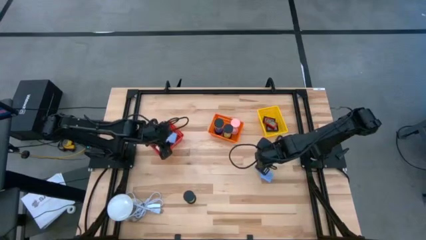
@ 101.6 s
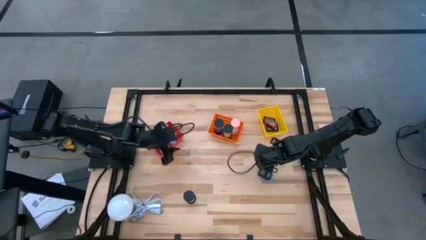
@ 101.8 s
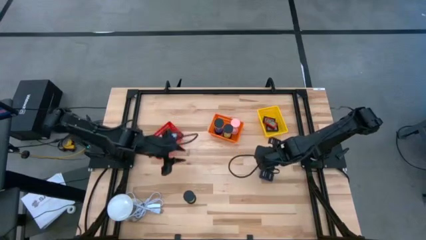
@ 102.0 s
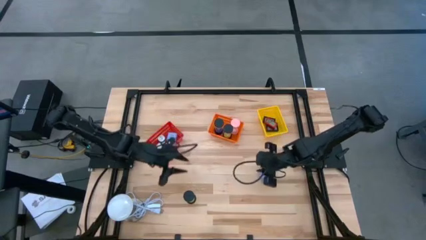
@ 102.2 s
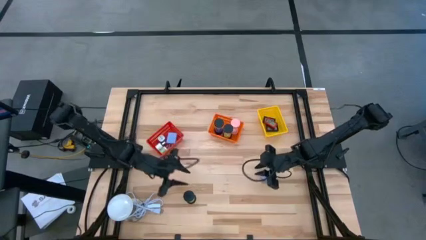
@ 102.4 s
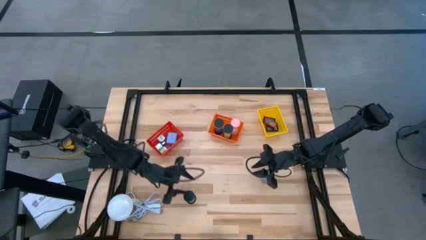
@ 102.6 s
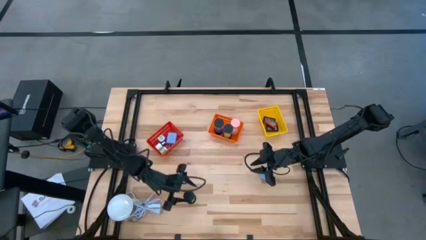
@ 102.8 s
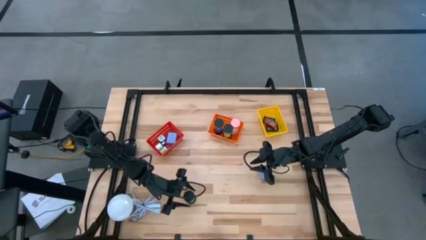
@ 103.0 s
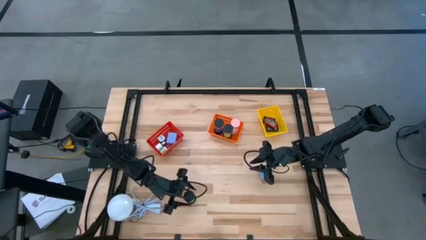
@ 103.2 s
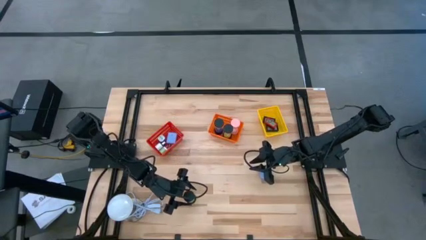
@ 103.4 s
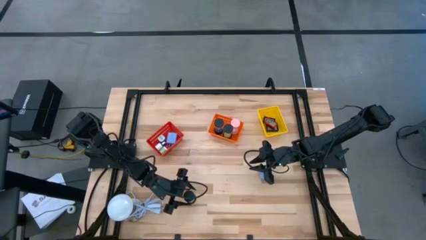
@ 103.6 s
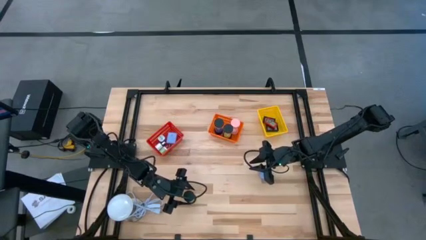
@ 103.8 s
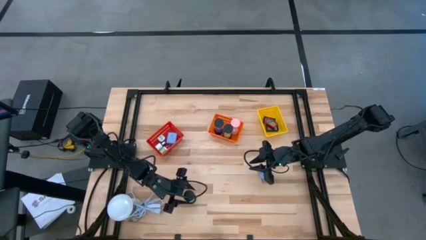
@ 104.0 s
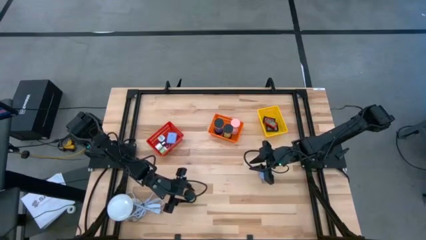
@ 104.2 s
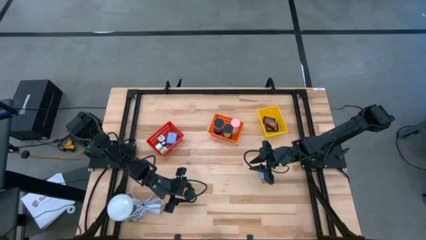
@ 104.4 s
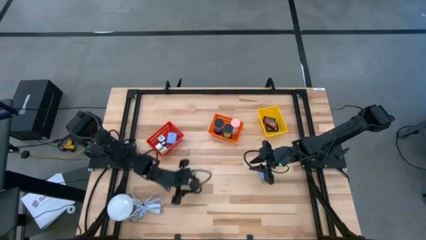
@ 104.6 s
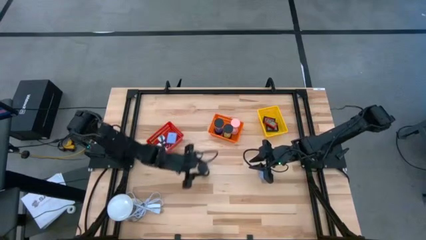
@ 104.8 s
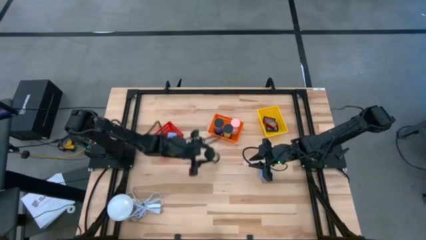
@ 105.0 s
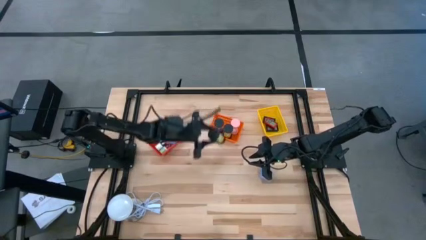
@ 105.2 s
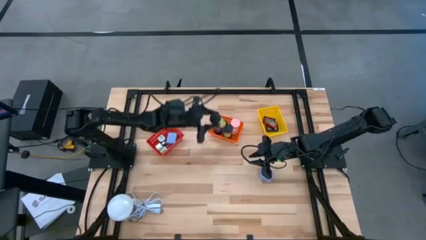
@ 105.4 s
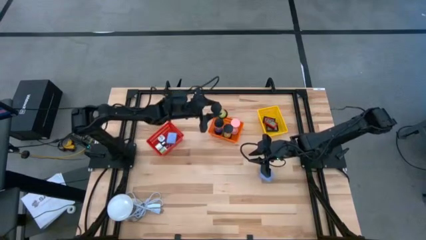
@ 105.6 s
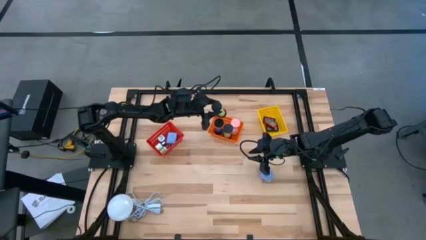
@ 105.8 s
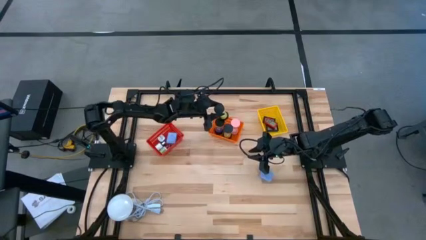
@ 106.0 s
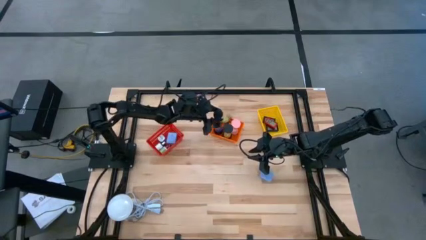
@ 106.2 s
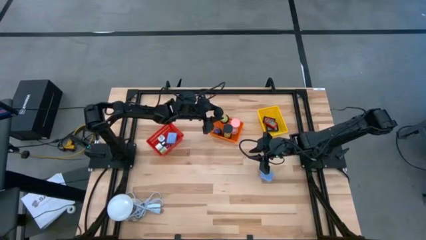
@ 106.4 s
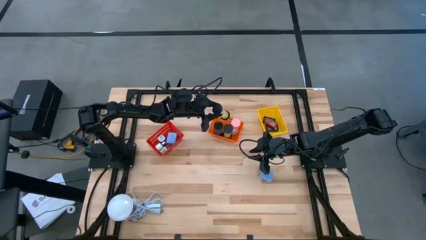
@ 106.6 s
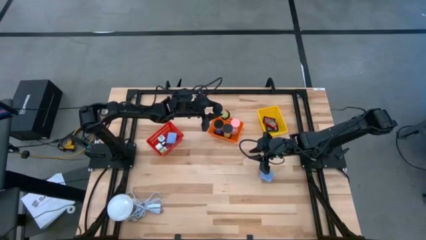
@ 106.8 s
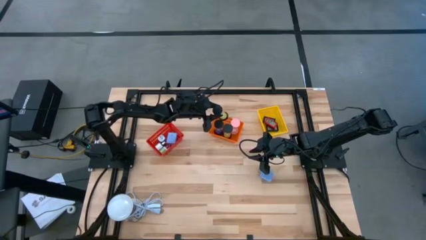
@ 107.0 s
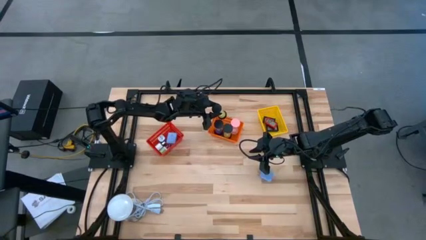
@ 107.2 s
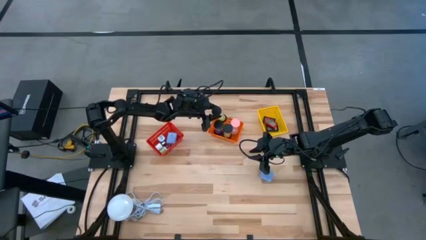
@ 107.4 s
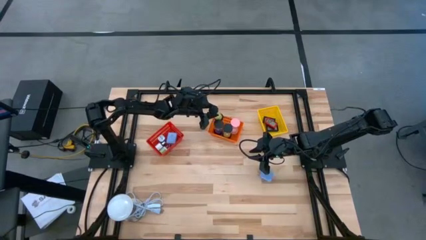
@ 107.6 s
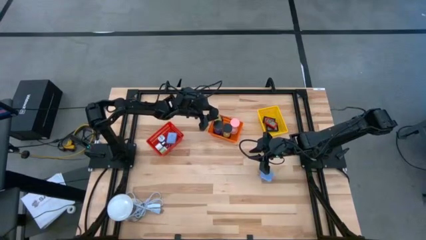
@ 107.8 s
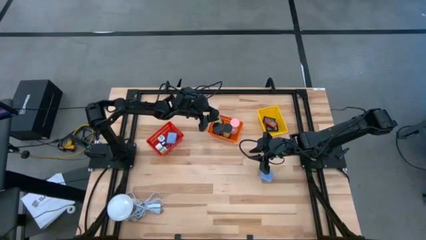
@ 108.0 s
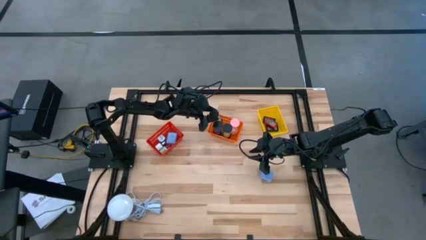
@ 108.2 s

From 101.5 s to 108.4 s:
Task: Pick & Place Office items
Put the black hourglass into the yellow basket

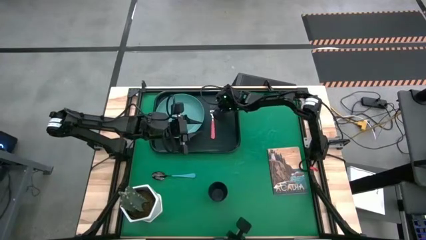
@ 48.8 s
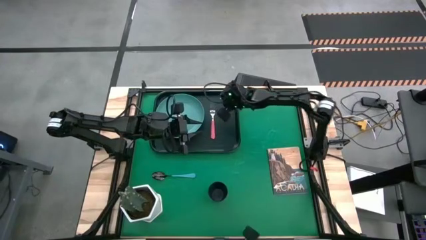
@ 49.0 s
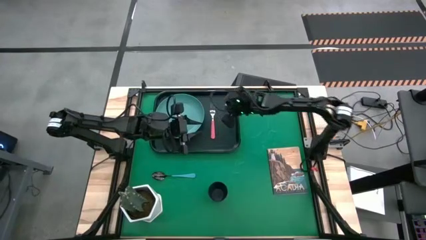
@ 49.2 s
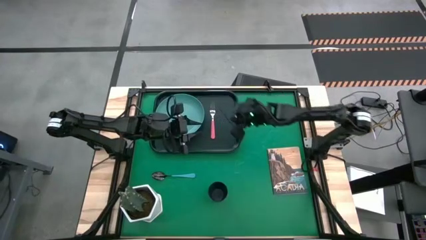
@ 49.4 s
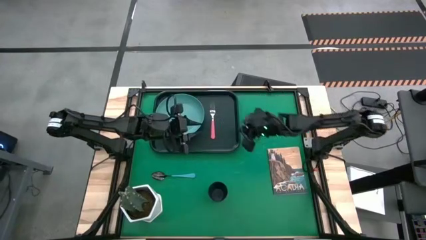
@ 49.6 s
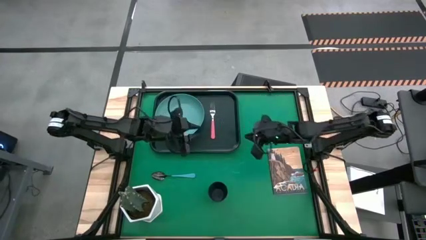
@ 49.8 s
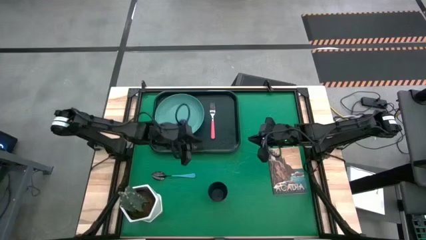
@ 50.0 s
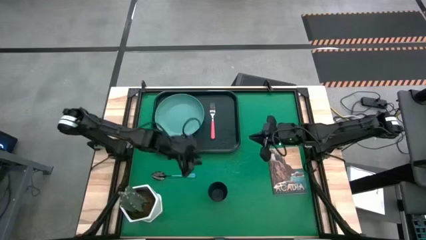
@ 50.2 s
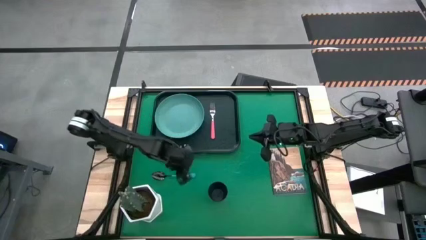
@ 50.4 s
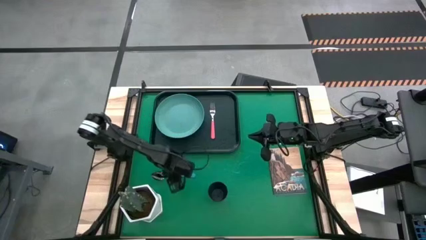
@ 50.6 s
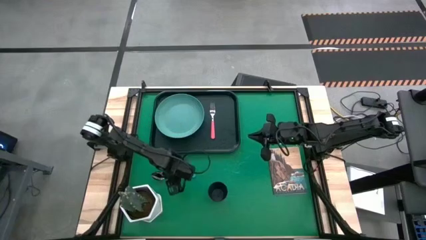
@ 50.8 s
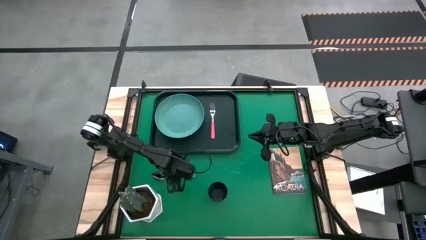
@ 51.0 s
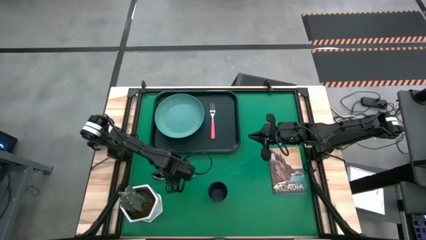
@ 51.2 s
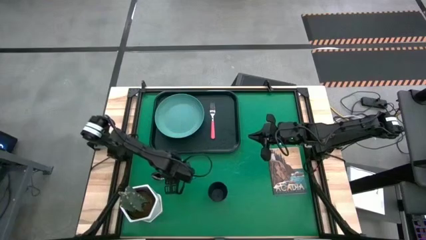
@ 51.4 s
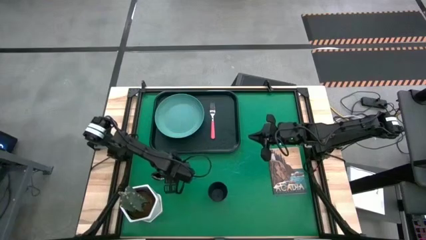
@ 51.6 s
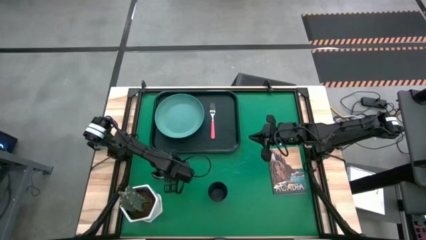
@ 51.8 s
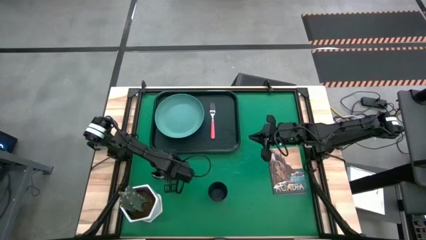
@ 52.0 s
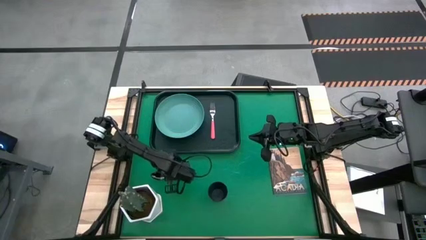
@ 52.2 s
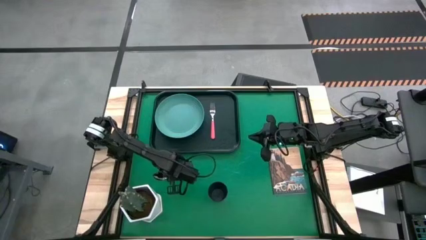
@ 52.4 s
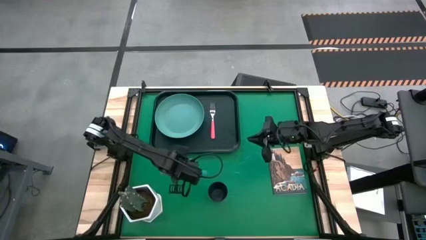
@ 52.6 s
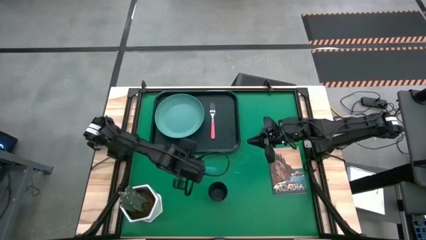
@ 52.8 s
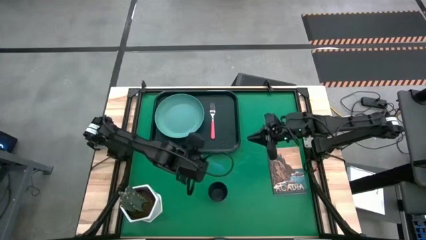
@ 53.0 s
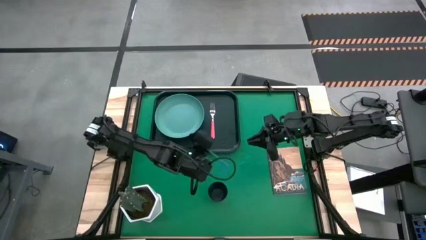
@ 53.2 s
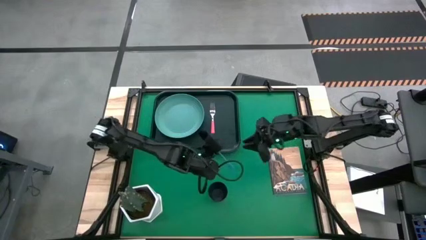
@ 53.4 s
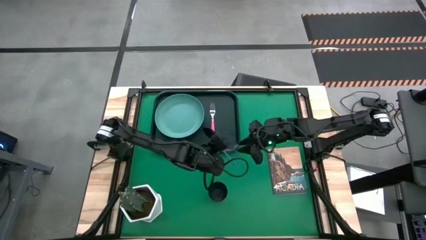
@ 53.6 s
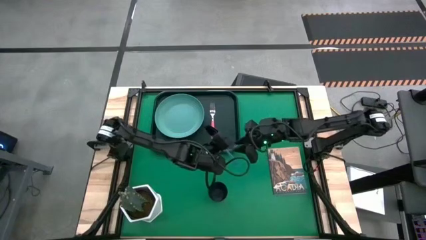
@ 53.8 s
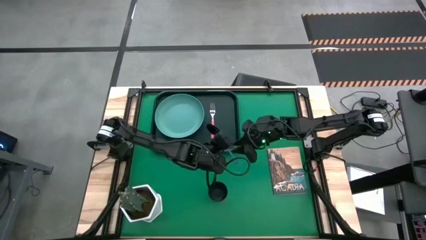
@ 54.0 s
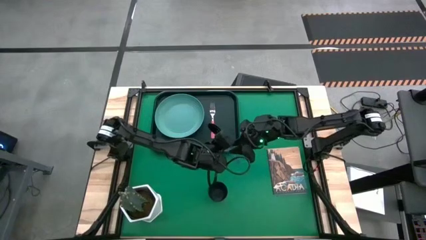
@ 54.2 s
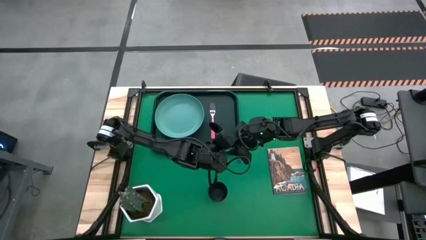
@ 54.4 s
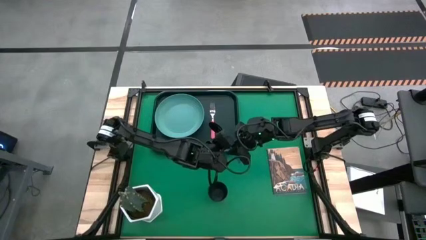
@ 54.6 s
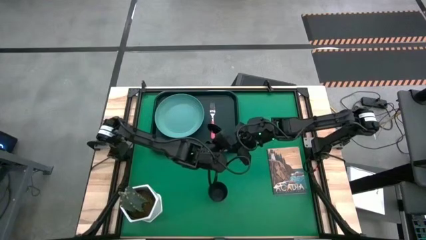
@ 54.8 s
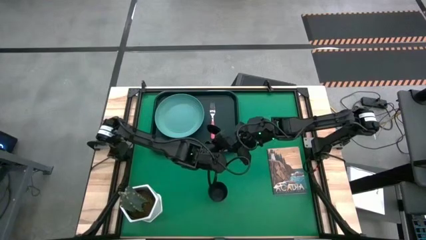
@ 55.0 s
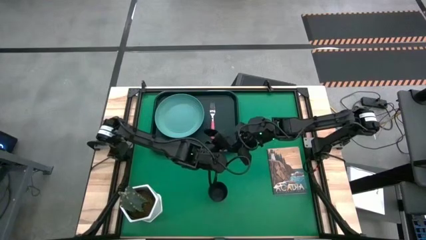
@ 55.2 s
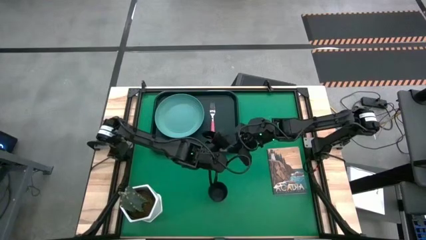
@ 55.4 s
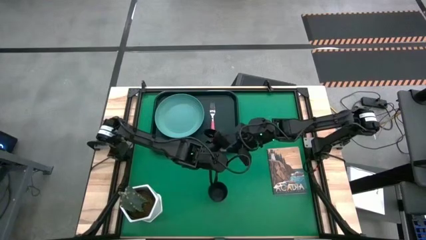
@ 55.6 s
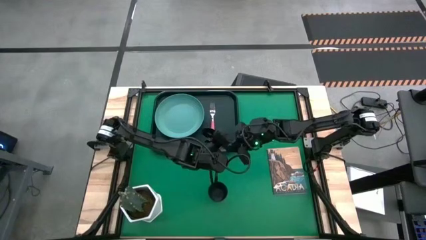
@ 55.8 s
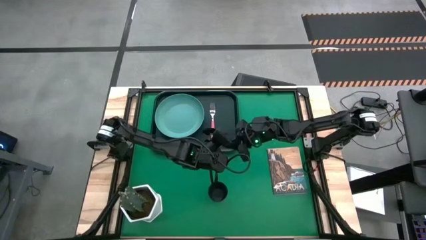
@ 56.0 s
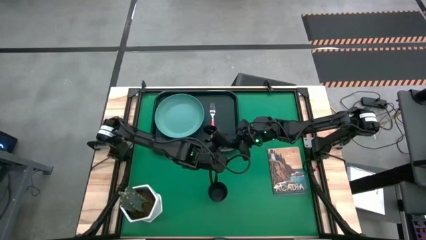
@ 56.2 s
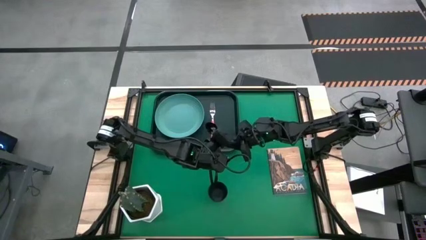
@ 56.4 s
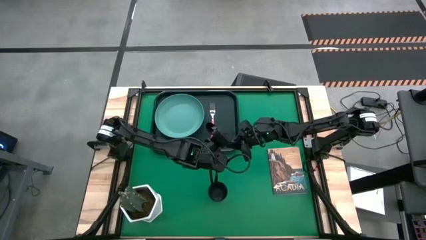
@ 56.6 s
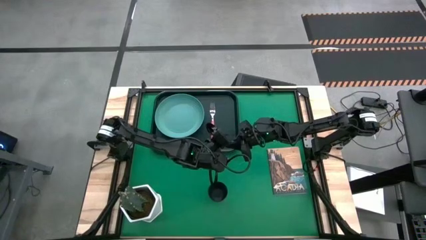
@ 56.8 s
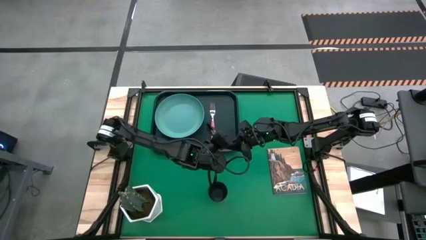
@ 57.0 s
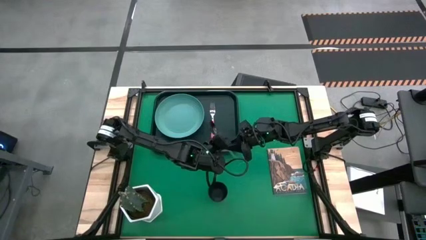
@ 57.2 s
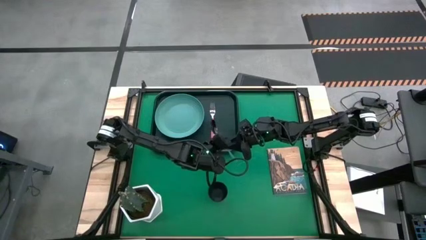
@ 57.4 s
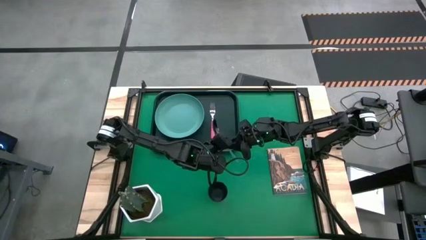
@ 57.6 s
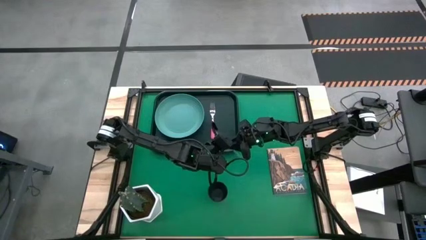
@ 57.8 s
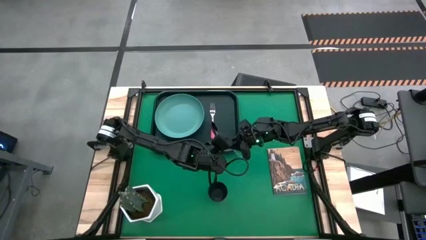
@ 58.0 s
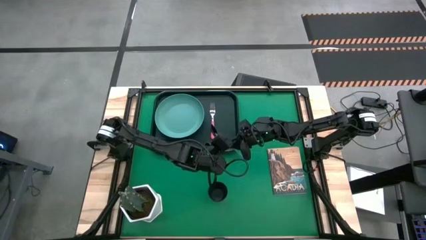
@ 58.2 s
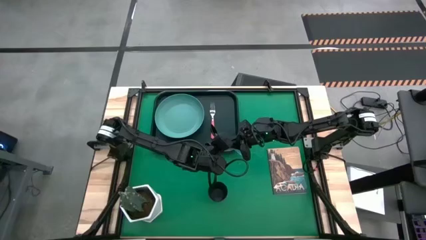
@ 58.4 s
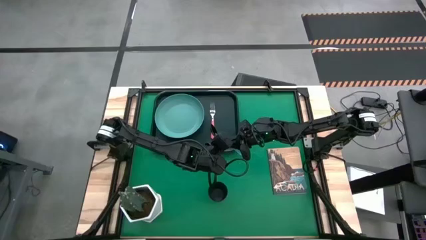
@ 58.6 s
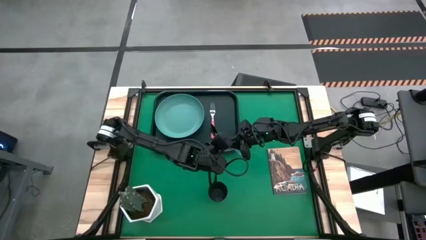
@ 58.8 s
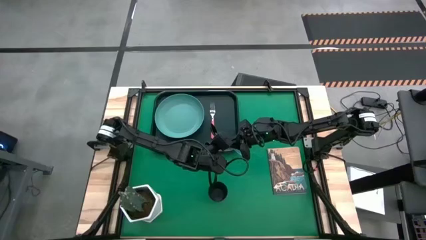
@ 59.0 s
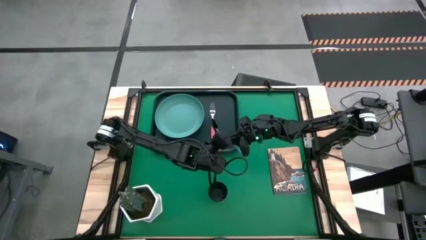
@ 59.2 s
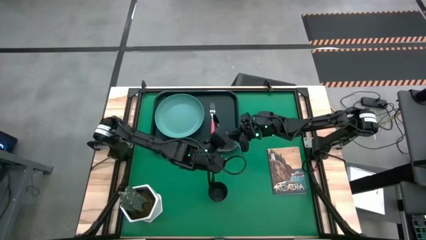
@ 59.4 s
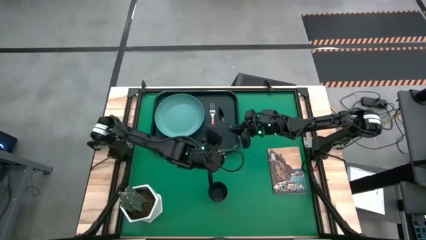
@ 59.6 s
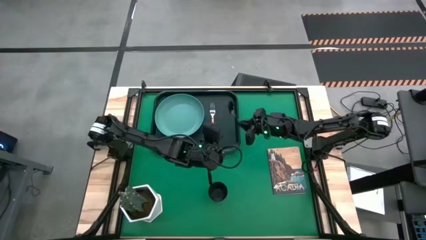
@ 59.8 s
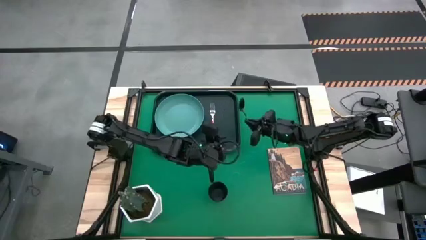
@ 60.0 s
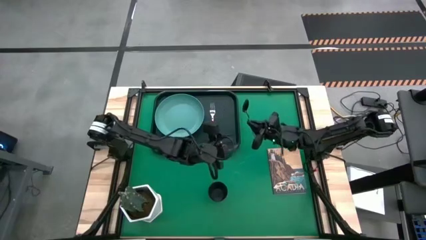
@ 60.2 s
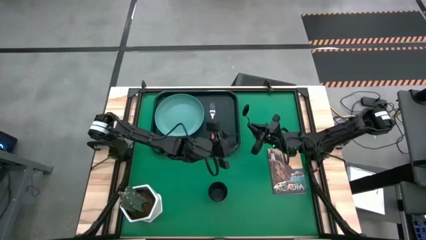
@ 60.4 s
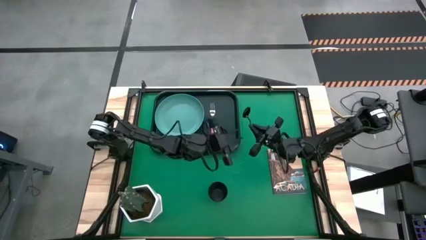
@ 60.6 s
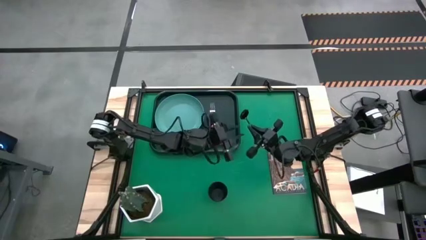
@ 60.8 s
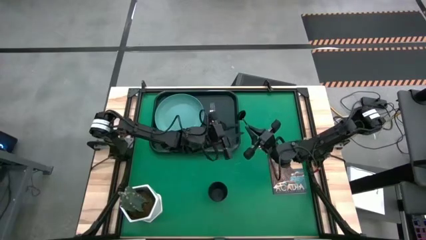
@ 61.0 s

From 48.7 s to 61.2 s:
Task: Pick and place plate/cup/fork/spoon on tray
Put the blue spoon on the black tray to the right of the pink fork
